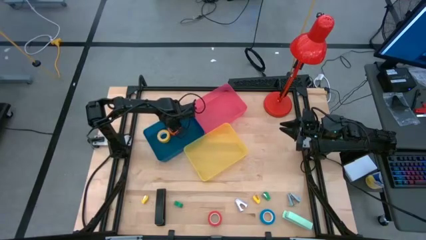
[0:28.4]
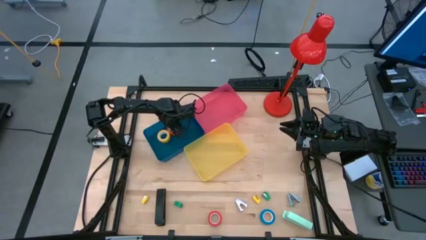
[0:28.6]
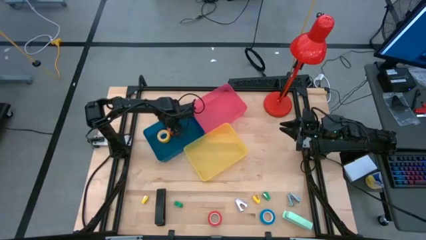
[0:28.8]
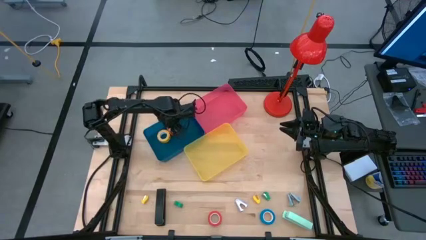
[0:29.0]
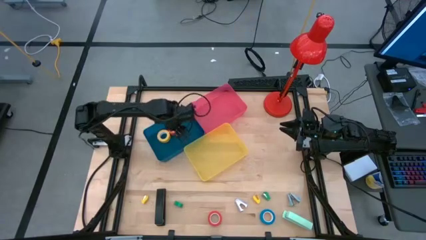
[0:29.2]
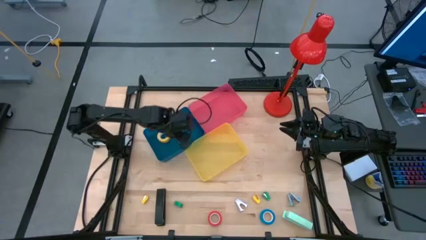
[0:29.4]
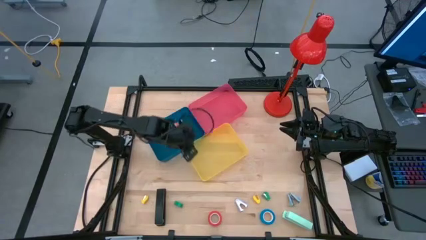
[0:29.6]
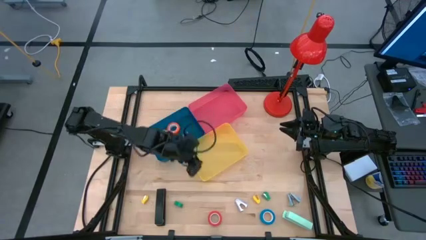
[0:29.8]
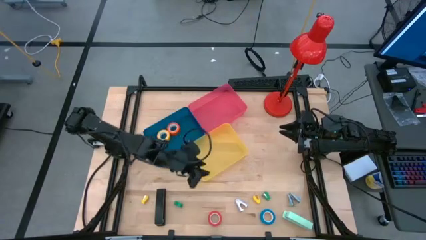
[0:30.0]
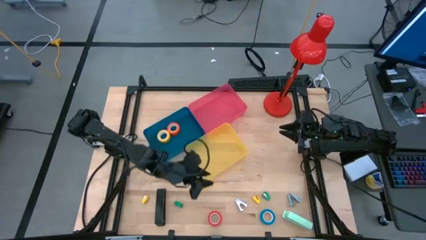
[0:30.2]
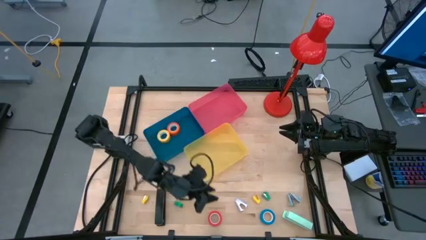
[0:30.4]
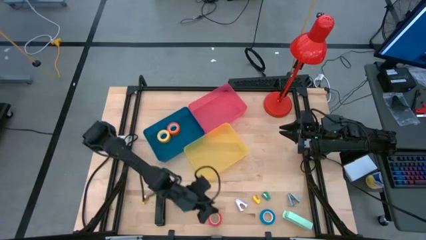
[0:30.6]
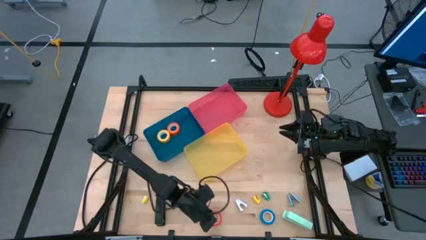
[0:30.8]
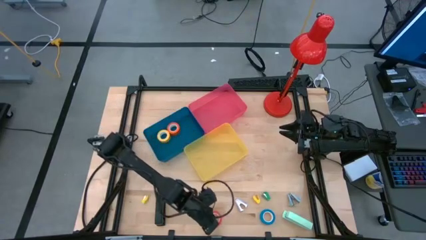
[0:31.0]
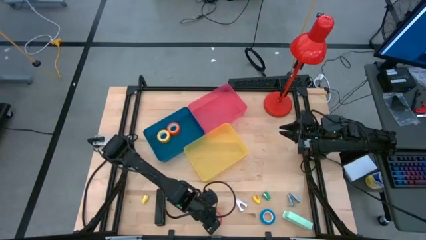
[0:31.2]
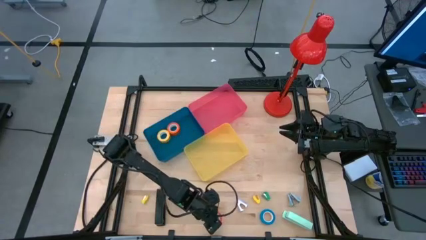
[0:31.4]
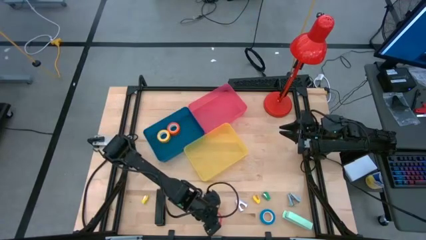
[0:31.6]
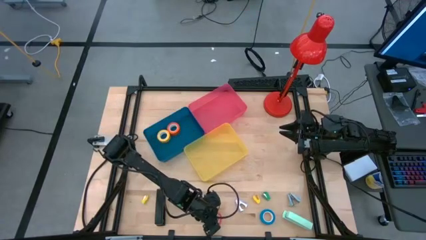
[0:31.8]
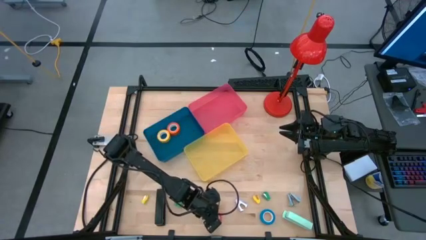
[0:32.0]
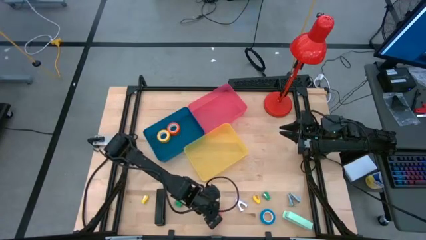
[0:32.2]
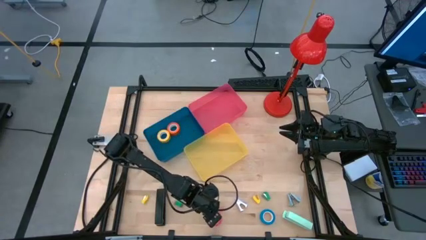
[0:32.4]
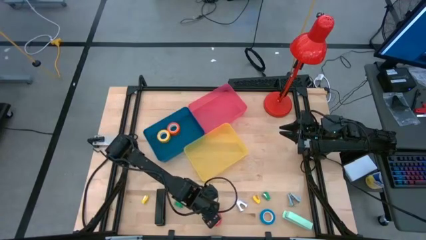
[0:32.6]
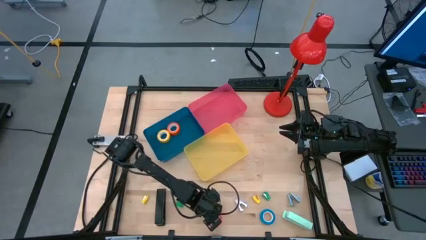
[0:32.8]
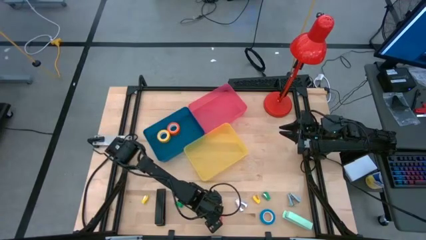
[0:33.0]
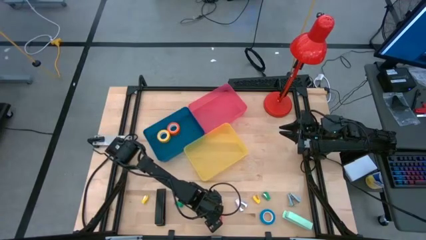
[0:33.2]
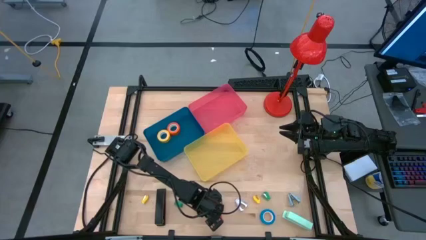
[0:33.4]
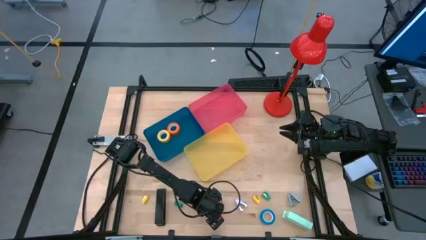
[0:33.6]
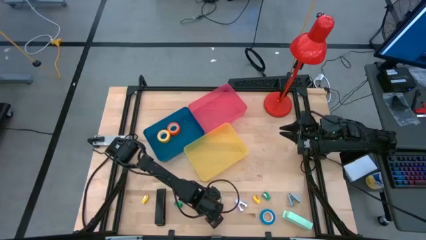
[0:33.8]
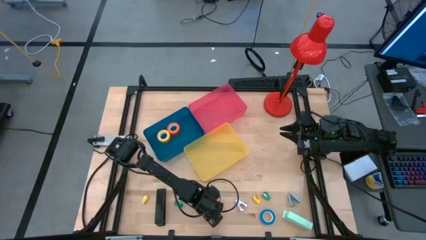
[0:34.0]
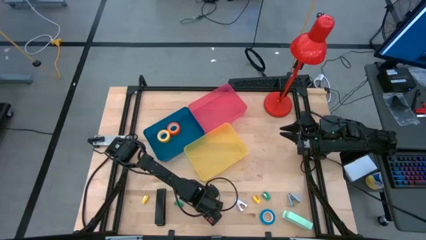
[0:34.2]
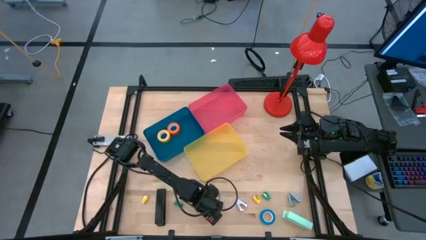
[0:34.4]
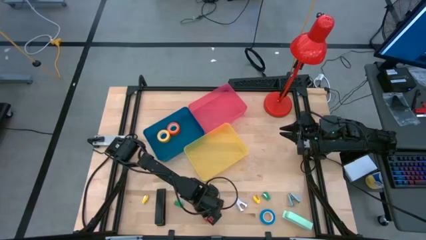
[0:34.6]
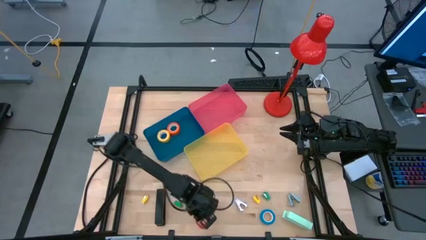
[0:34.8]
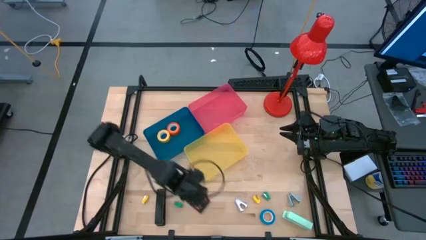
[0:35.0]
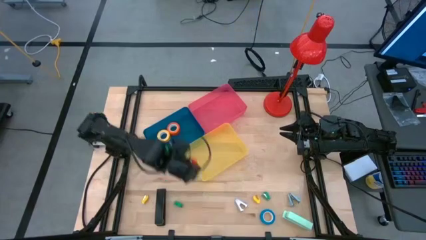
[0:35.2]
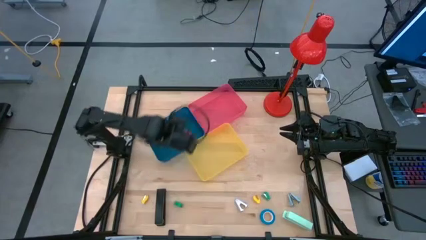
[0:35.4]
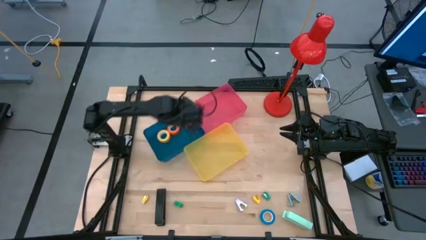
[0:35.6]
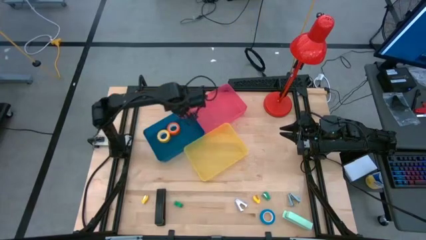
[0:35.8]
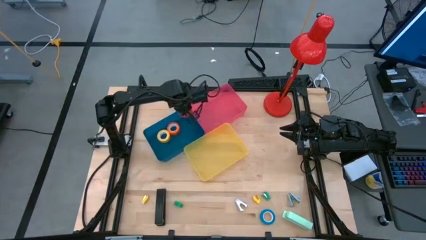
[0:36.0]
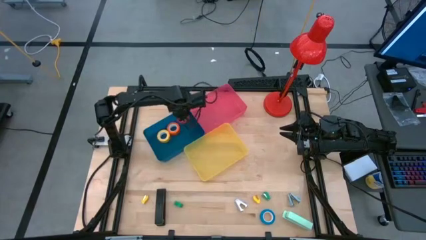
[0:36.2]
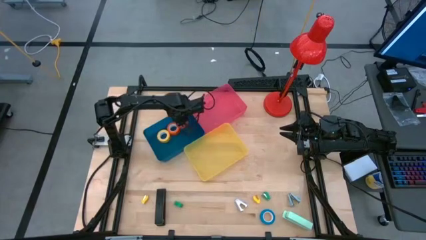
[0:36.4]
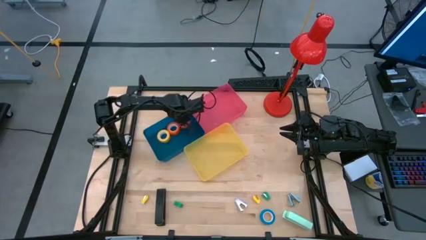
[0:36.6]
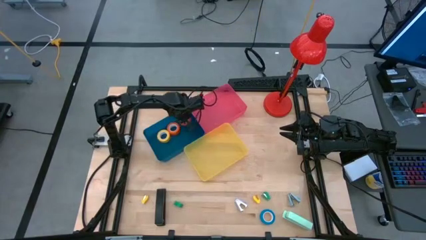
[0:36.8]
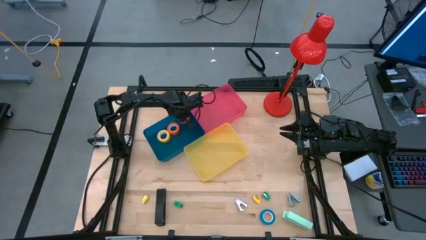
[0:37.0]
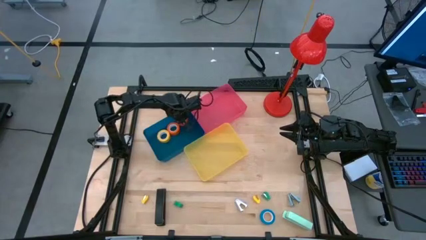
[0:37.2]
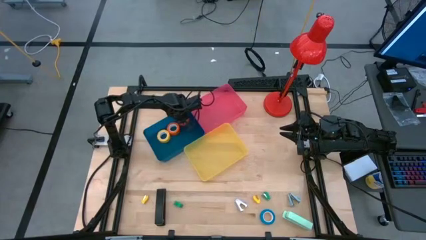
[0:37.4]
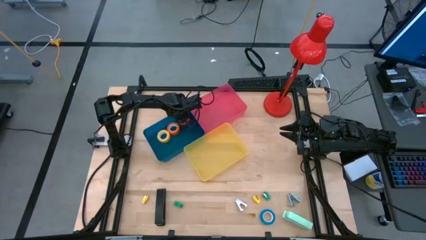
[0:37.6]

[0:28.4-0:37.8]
Task: Pick and place Stapler, Stapler remover, tape
Put the red tape into the blue bin

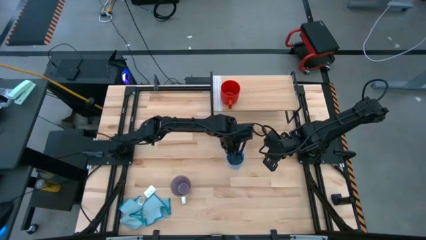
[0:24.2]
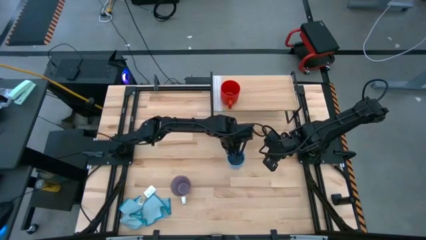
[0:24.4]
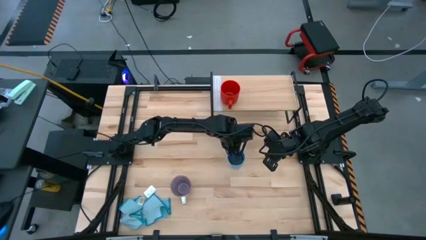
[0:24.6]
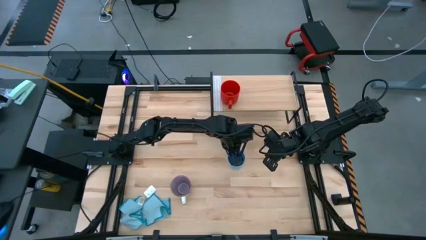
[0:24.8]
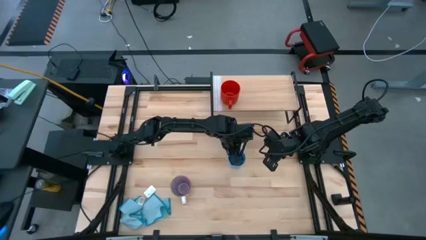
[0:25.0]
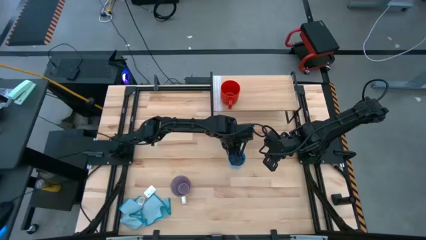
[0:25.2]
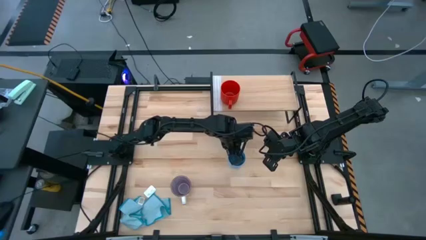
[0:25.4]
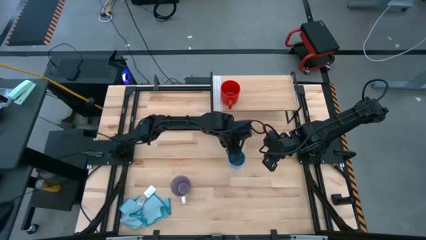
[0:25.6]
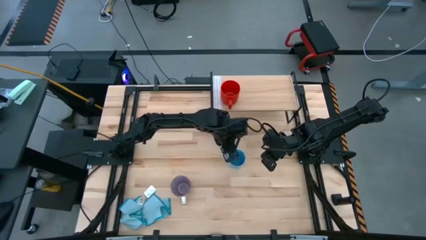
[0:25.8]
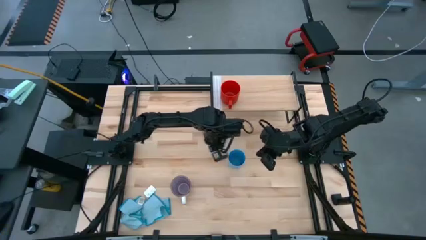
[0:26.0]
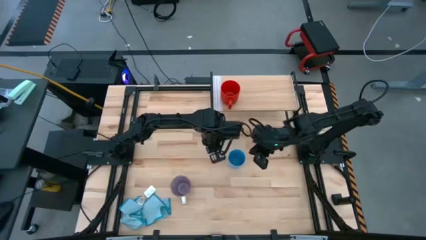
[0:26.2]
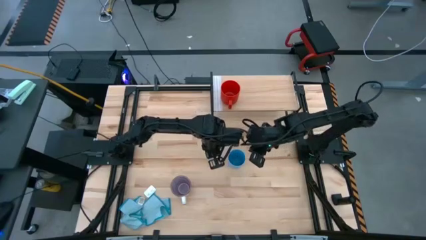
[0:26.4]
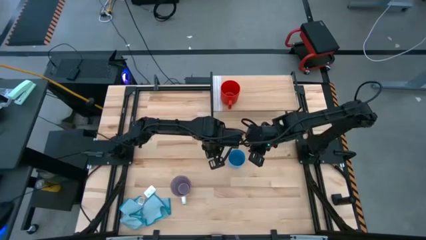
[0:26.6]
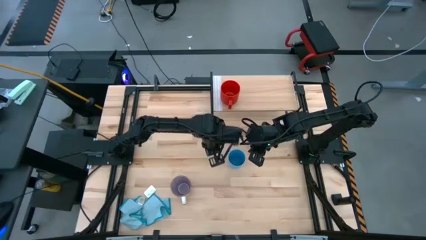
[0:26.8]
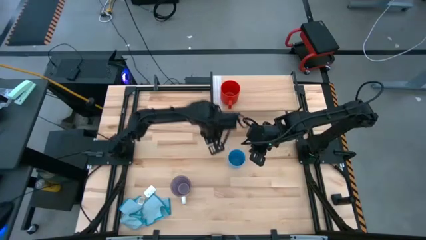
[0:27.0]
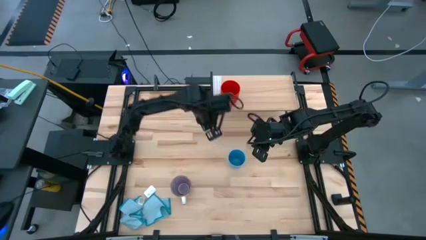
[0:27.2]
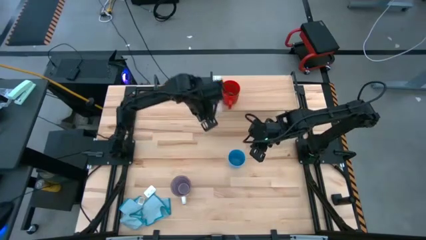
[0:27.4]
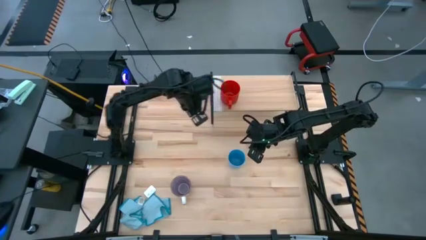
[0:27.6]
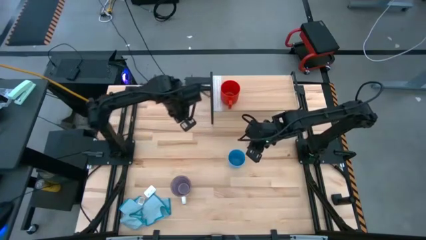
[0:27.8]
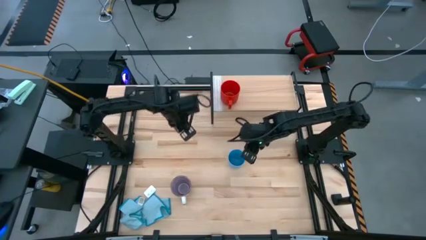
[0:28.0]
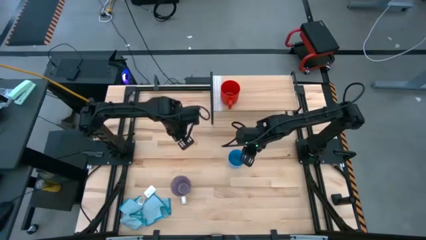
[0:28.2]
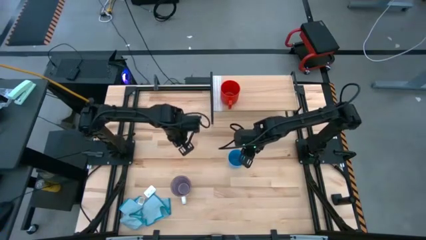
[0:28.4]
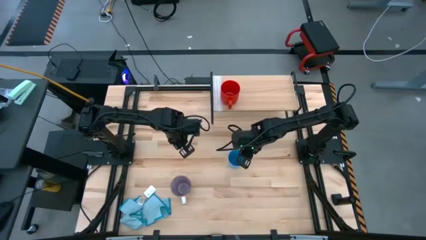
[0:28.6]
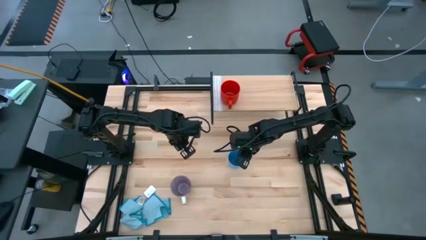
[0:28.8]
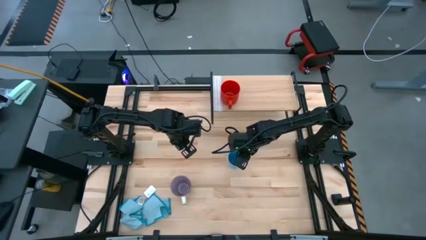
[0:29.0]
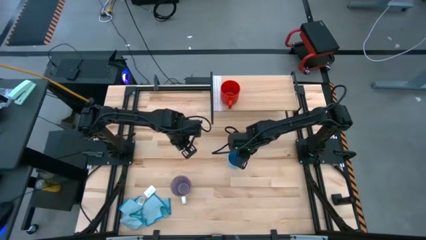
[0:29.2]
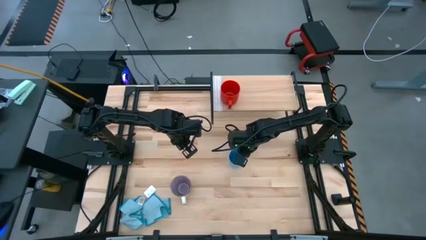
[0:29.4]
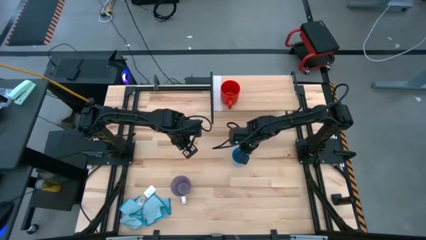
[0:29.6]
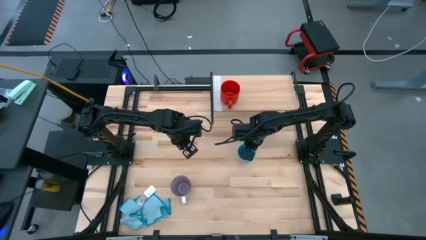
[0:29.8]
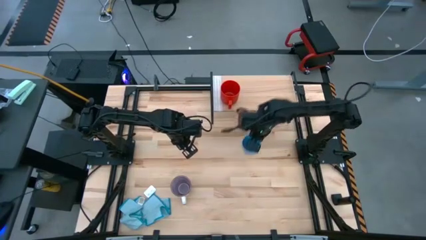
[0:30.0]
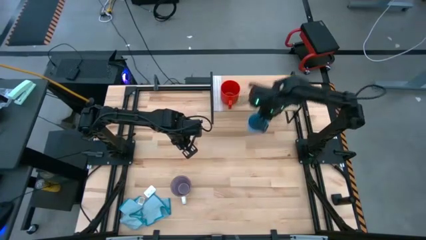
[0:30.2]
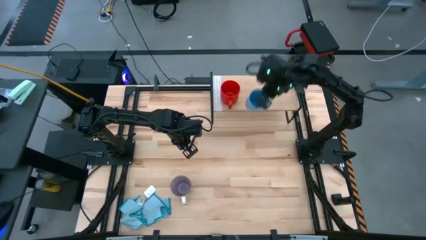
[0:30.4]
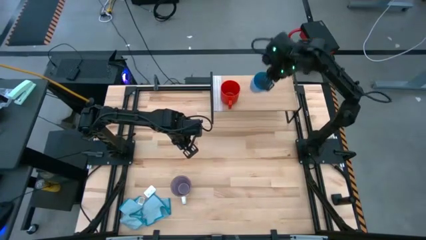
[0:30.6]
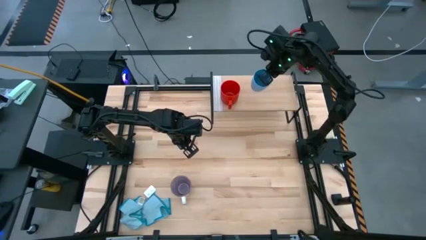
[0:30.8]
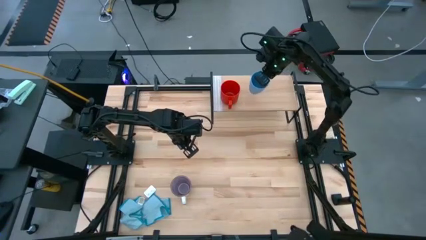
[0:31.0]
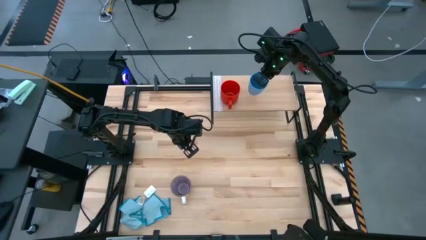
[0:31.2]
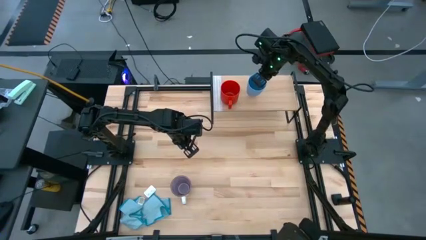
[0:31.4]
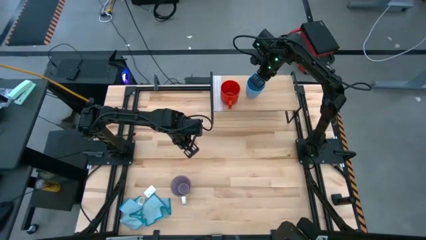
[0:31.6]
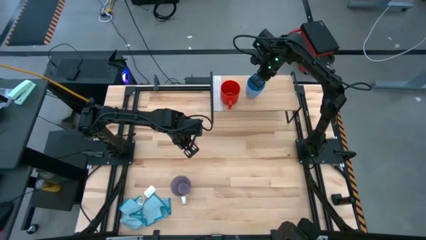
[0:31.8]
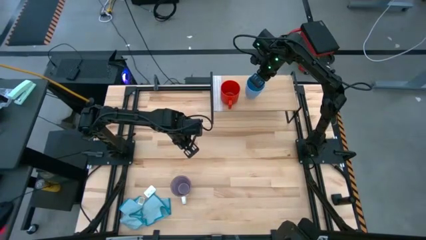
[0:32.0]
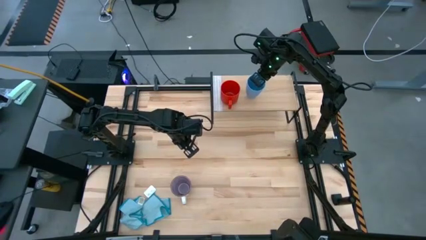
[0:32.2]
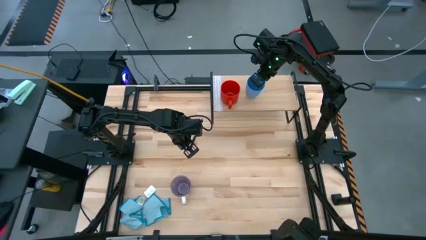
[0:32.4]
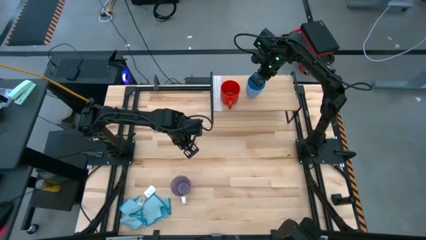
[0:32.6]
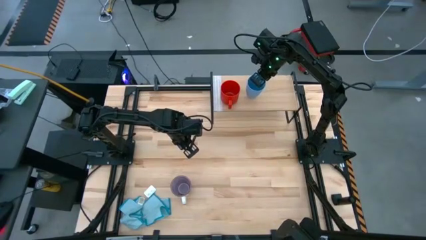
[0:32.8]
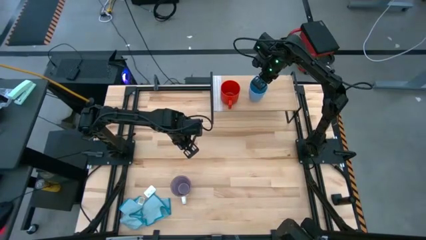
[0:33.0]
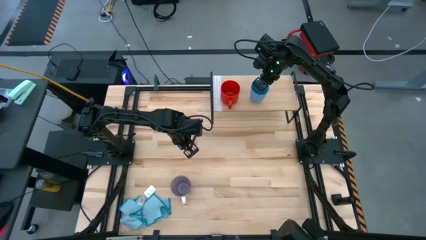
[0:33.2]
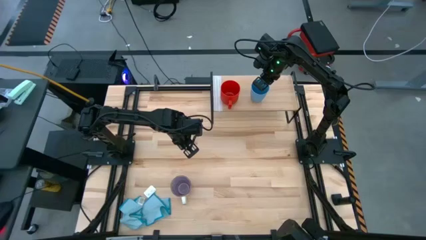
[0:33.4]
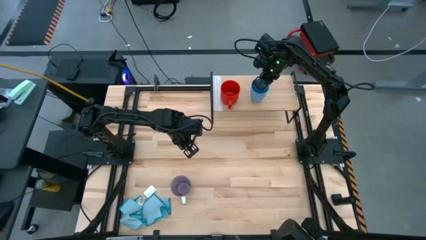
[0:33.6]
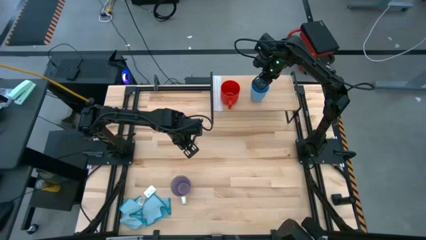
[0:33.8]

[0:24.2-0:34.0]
Task: Stack small to large cups/mugs on shelf
Put the blue cup on the shelf
